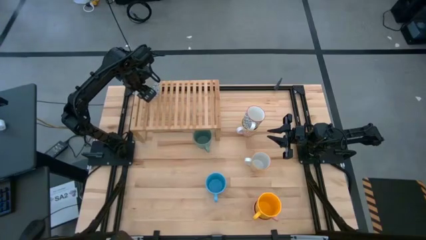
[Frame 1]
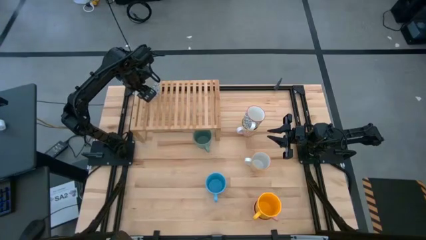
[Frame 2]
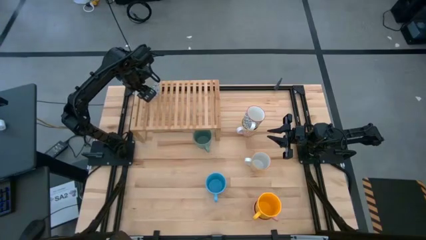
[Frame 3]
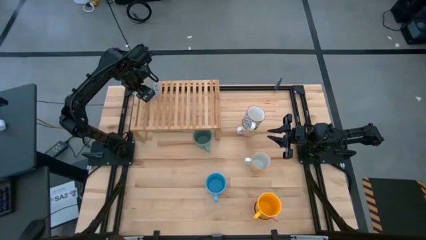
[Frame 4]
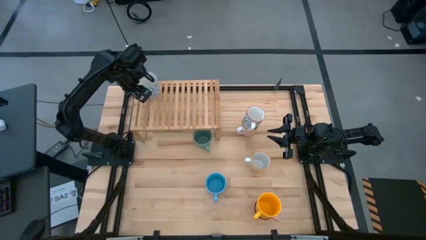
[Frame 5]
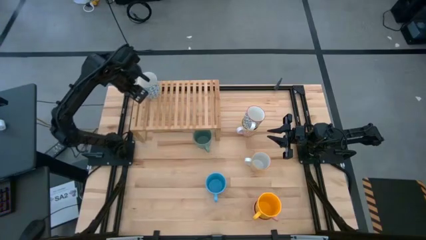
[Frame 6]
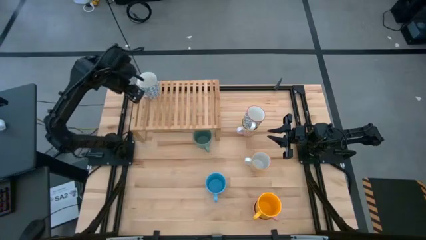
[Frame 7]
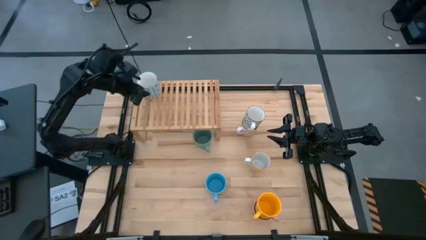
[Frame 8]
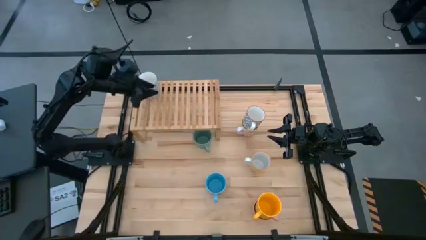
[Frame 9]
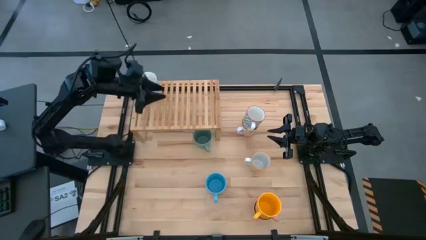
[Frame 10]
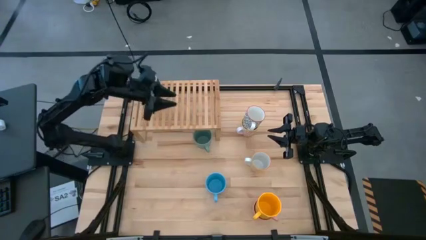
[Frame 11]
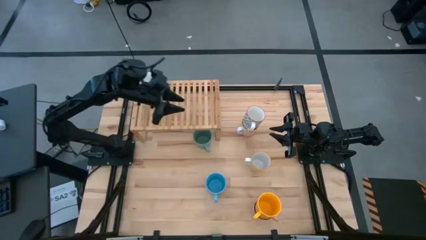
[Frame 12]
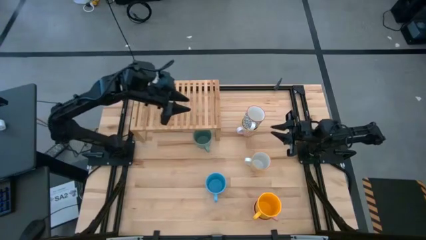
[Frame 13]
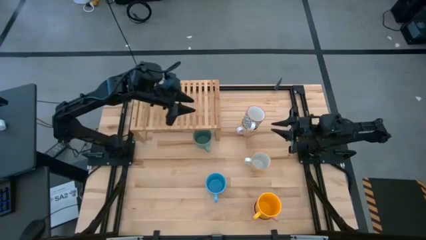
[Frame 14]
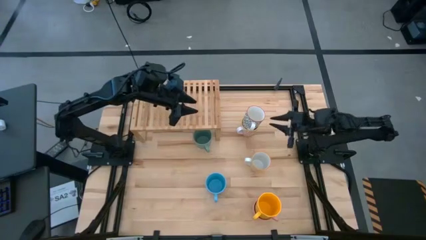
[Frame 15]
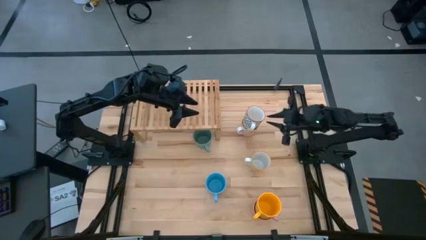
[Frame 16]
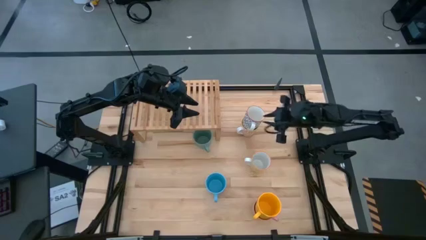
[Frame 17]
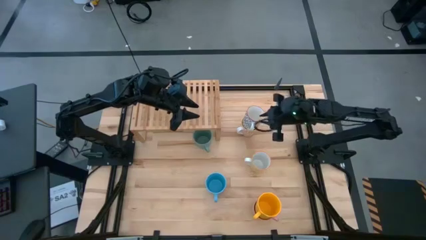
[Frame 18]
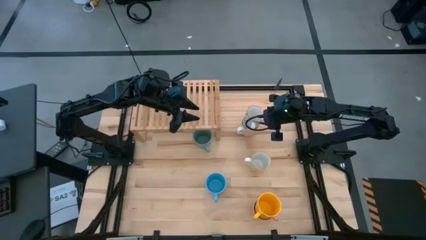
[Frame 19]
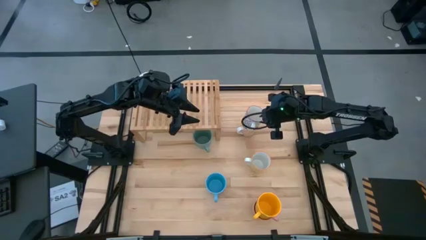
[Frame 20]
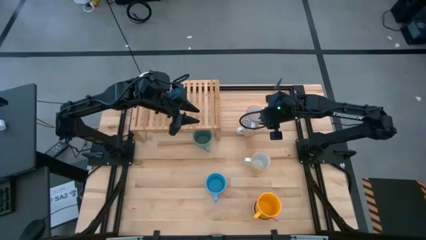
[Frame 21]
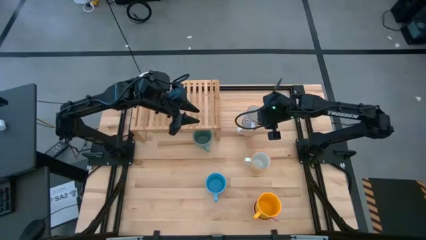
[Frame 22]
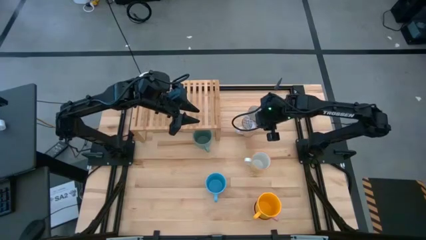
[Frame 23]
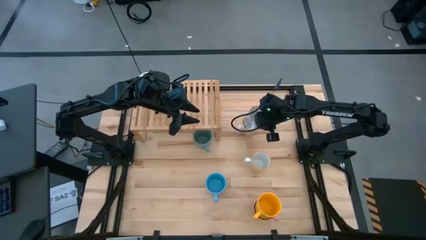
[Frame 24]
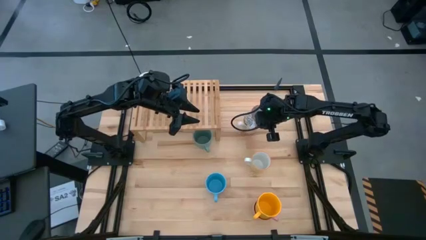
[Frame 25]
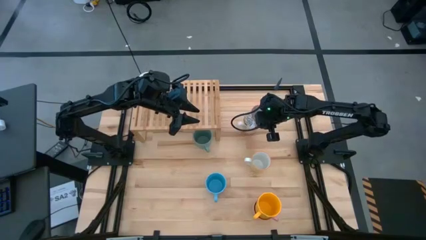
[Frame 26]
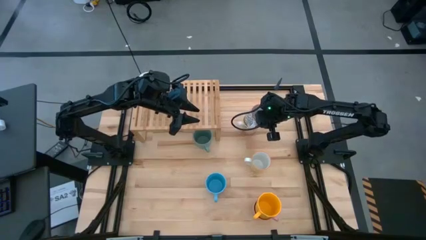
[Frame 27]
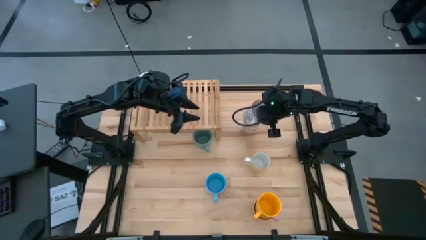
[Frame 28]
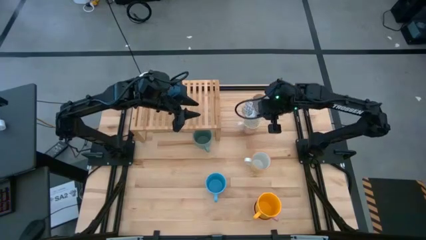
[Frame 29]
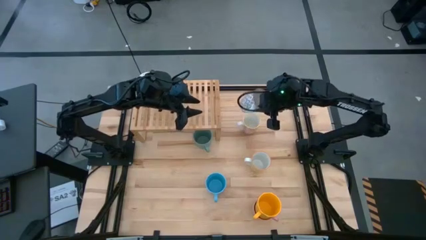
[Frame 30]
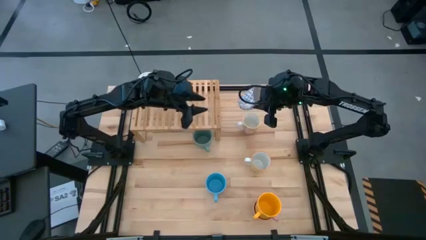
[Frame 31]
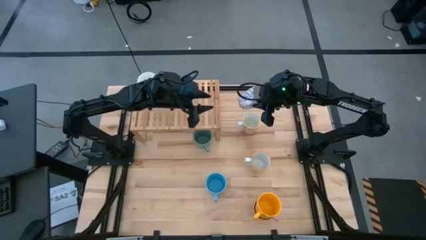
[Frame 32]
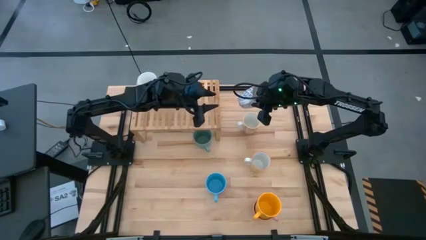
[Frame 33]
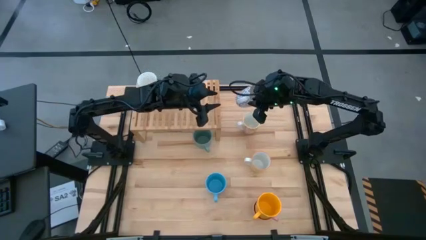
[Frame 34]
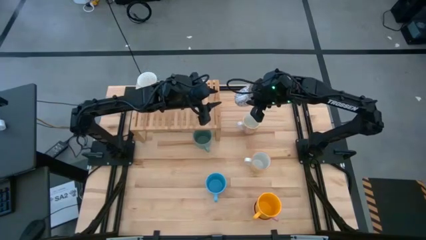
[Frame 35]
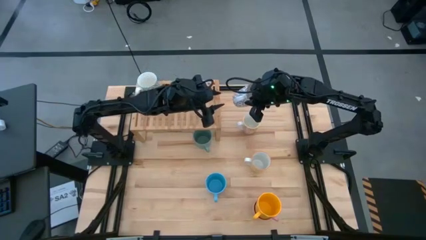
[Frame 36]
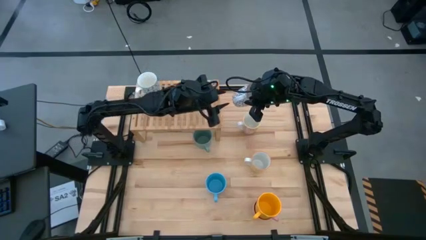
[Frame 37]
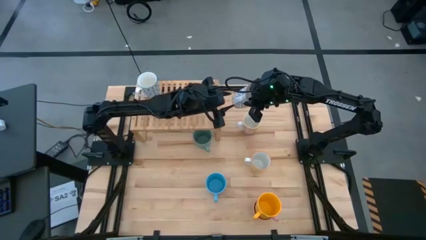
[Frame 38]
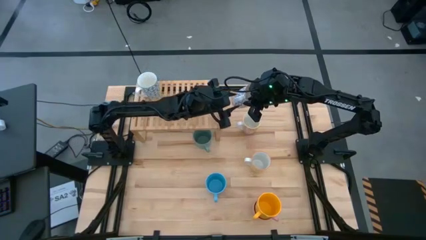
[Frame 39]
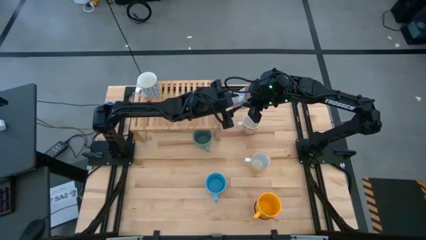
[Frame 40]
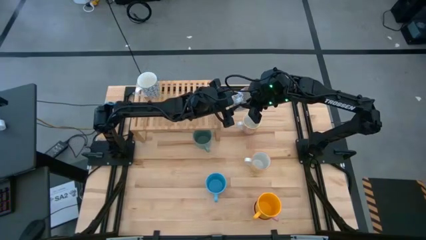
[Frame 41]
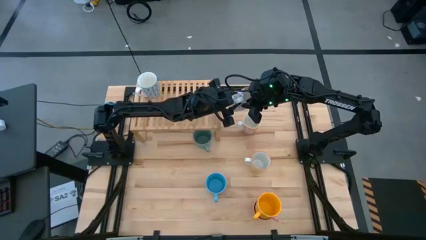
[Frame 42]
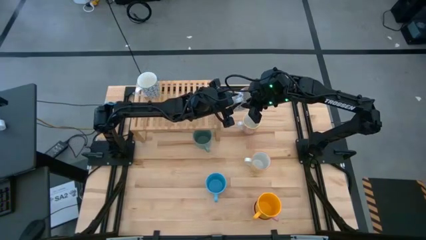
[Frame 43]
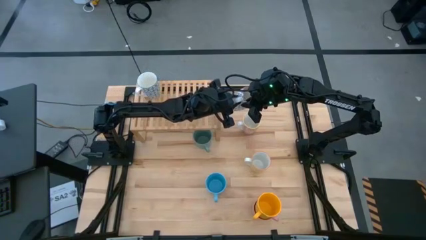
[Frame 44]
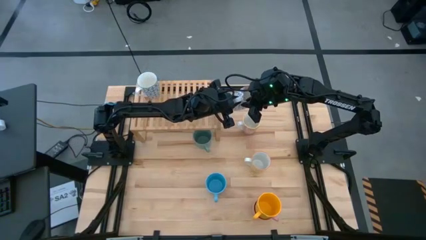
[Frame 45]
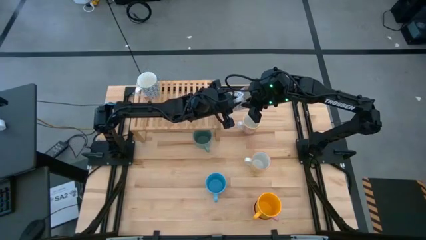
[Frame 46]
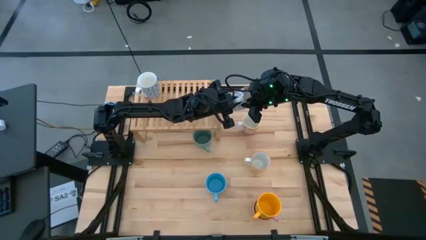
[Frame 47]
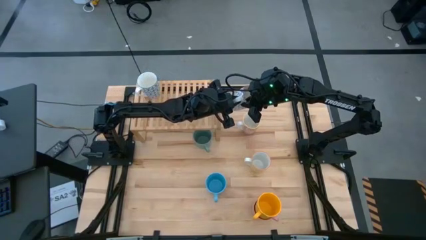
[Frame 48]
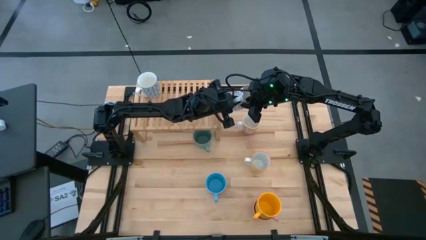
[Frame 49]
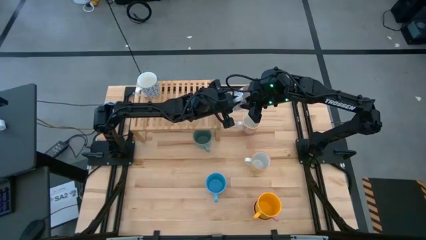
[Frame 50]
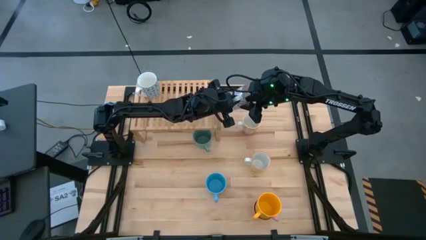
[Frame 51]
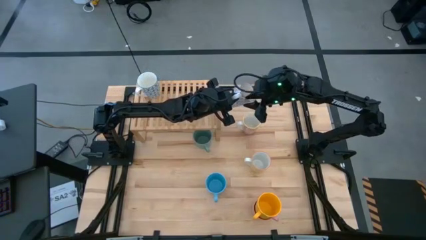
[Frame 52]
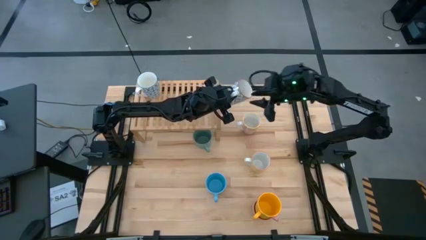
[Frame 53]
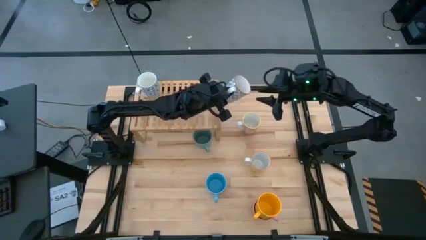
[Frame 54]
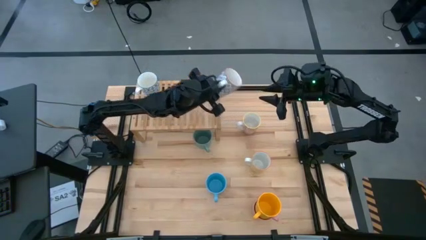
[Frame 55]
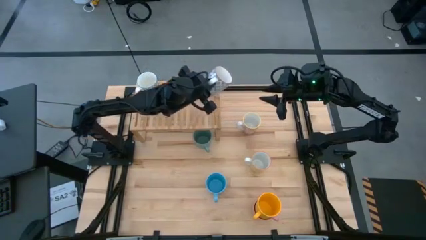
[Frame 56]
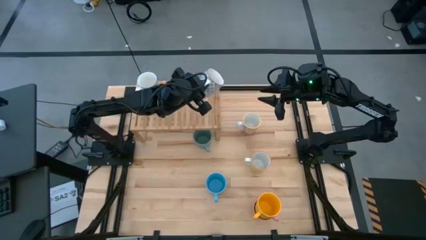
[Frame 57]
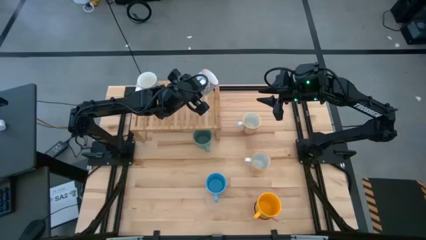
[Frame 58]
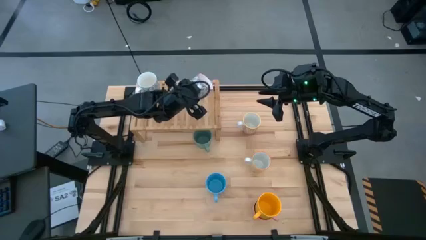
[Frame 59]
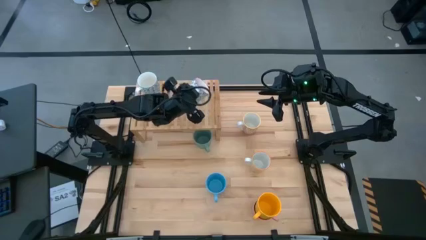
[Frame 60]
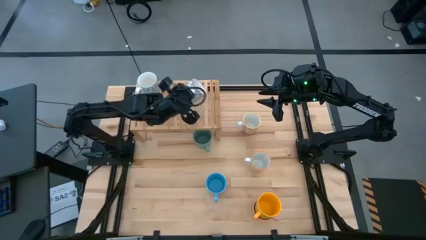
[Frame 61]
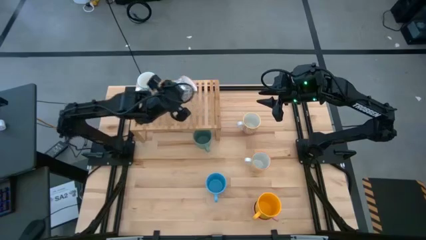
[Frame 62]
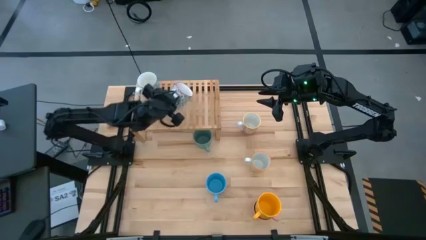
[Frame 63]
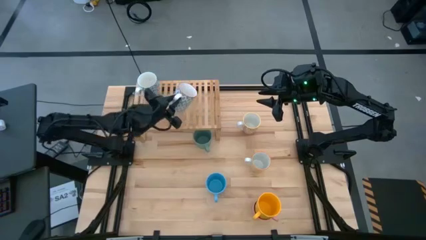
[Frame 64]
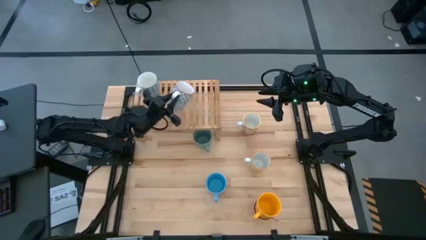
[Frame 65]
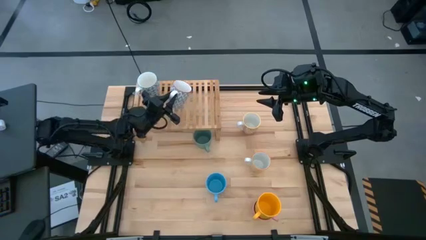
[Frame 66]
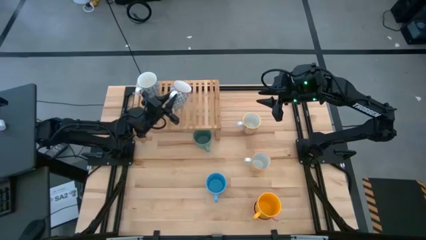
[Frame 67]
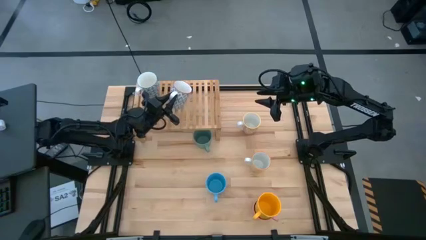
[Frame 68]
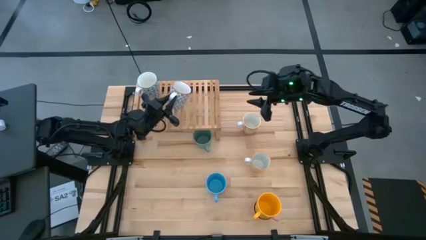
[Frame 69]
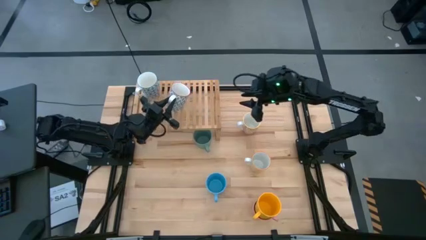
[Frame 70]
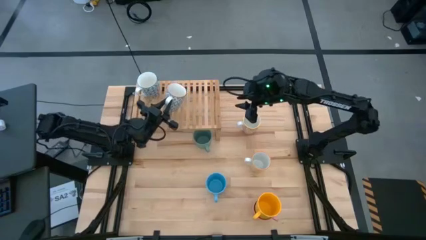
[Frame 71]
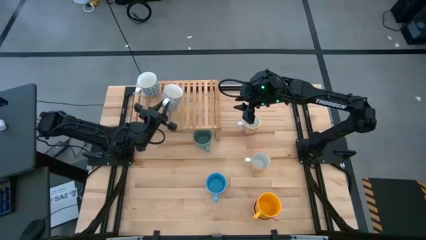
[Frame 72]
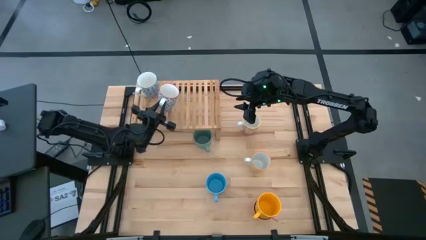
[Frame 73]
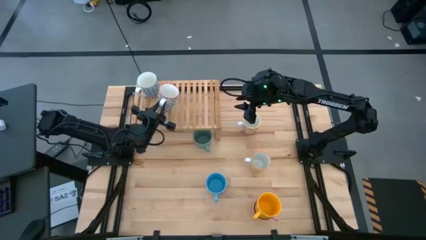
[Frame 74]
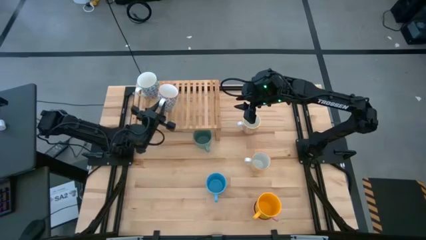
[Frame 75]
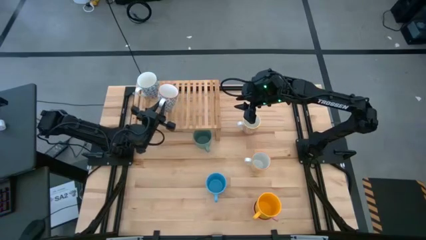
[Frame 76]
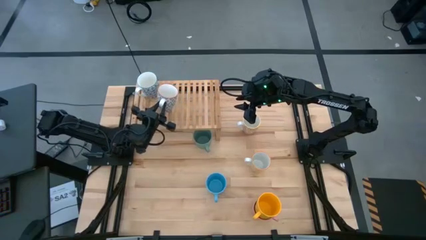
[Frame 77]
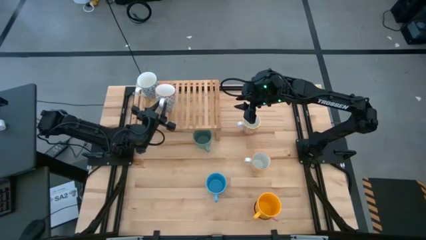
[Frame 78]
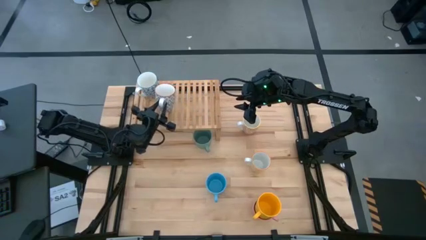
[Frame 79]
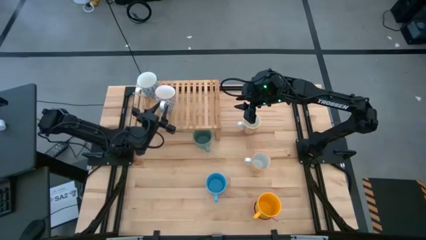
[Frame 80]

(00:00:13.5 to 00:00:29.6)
Task: Place coffee mugs
Put the white-gray patterned mug on the shelf
